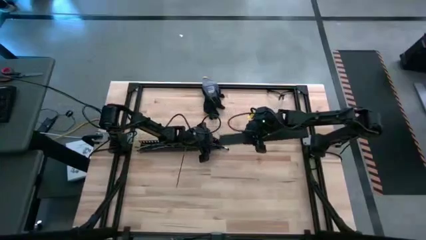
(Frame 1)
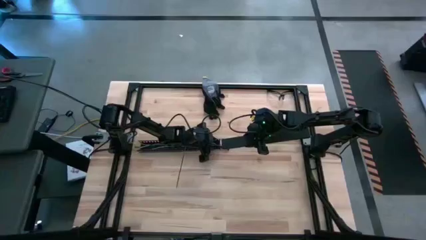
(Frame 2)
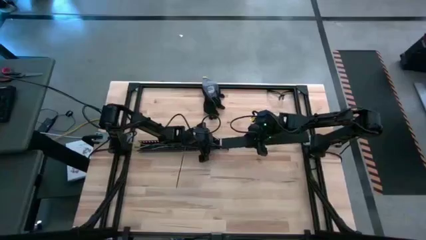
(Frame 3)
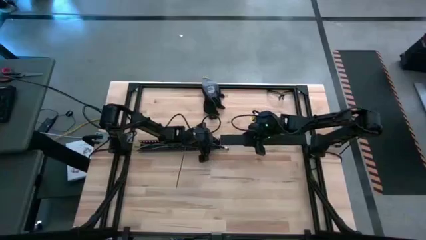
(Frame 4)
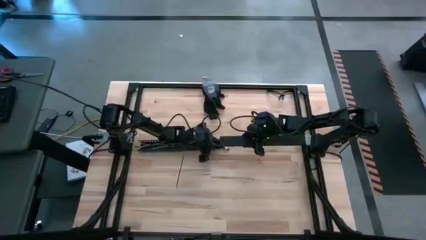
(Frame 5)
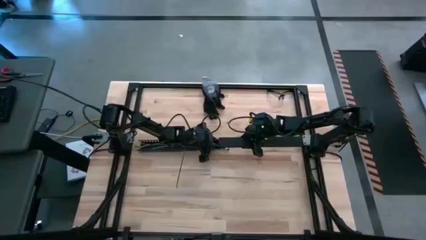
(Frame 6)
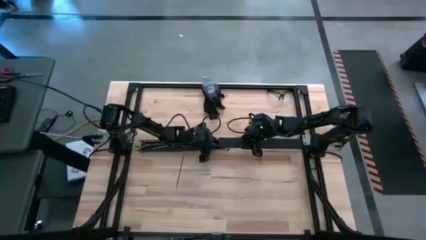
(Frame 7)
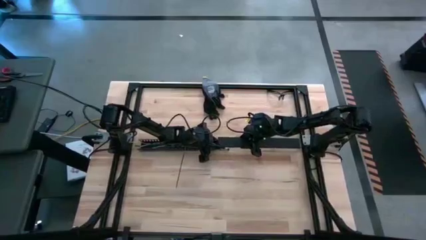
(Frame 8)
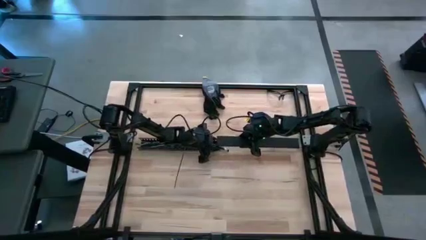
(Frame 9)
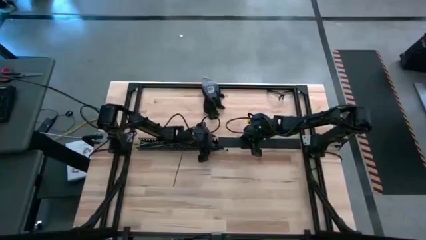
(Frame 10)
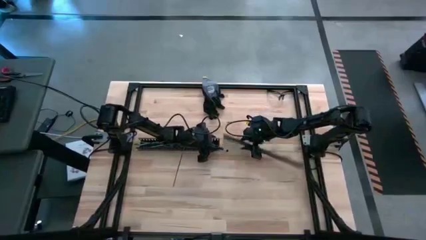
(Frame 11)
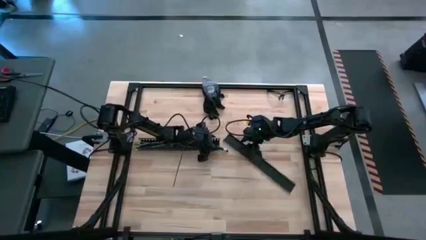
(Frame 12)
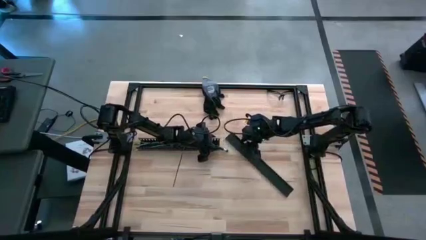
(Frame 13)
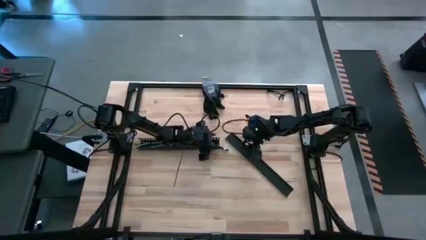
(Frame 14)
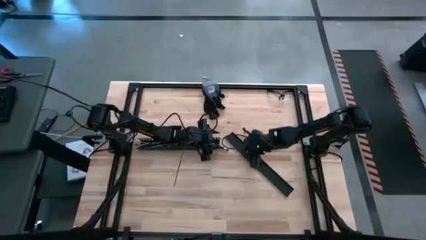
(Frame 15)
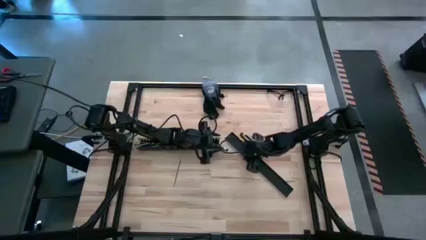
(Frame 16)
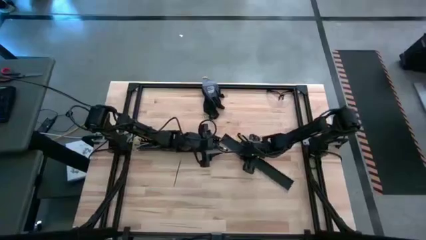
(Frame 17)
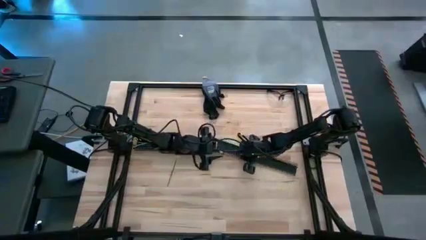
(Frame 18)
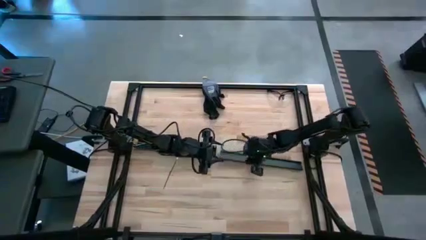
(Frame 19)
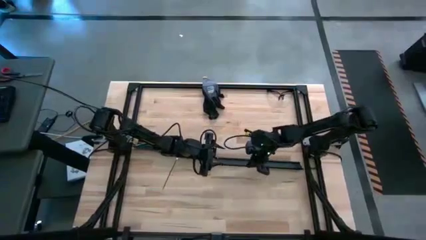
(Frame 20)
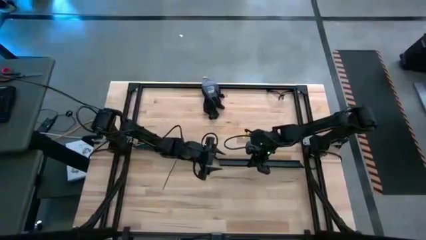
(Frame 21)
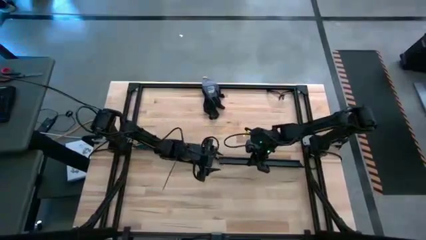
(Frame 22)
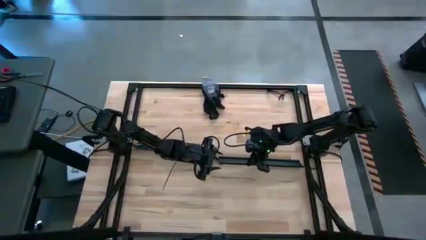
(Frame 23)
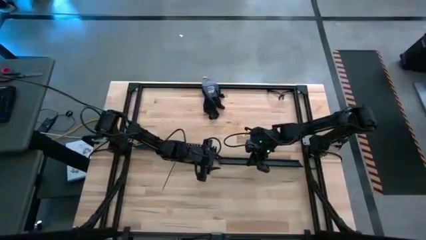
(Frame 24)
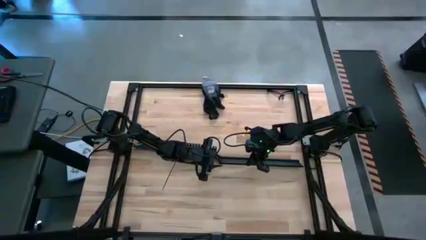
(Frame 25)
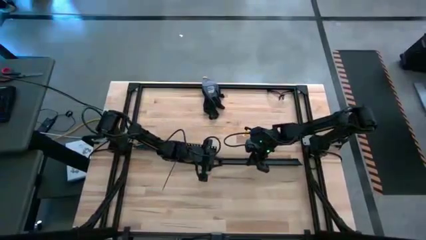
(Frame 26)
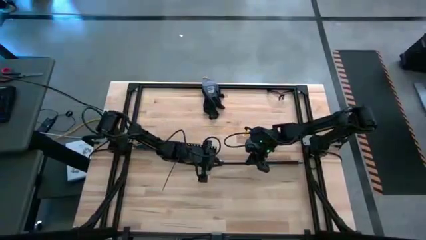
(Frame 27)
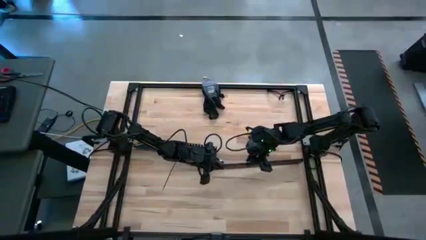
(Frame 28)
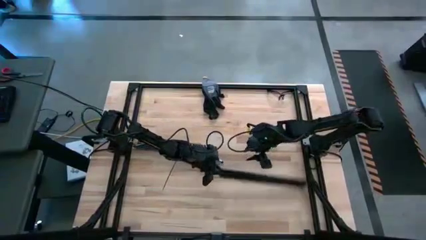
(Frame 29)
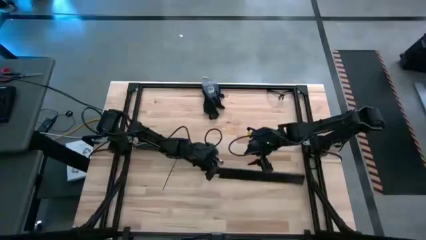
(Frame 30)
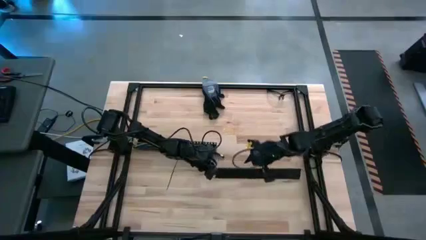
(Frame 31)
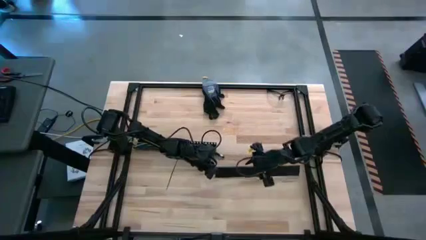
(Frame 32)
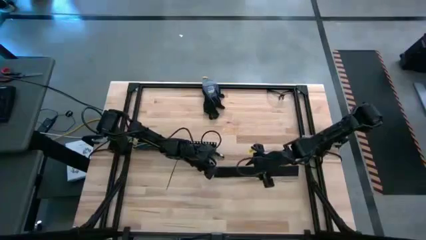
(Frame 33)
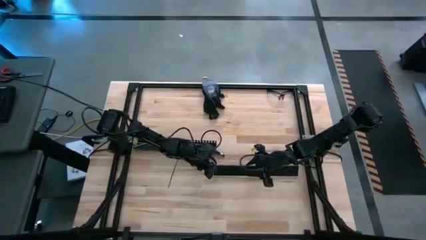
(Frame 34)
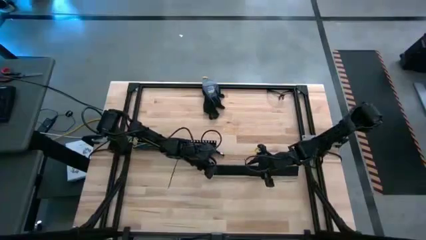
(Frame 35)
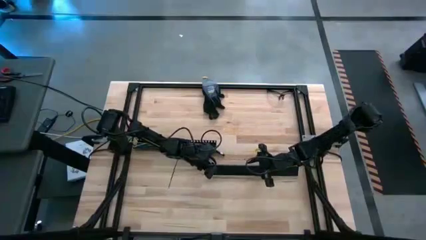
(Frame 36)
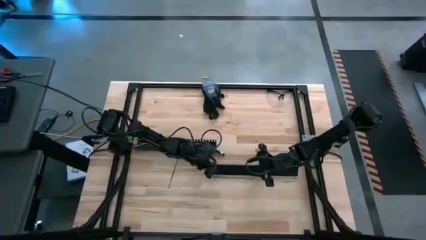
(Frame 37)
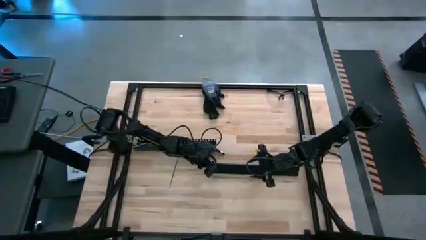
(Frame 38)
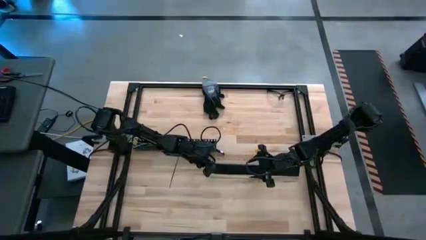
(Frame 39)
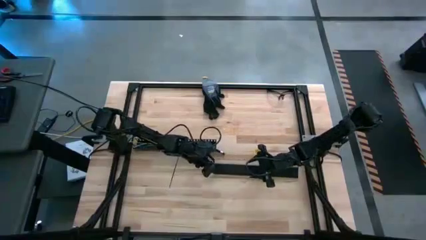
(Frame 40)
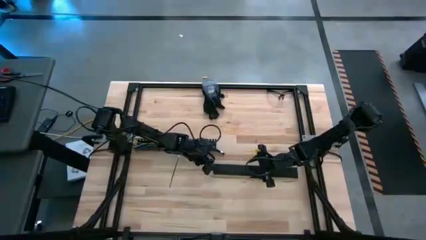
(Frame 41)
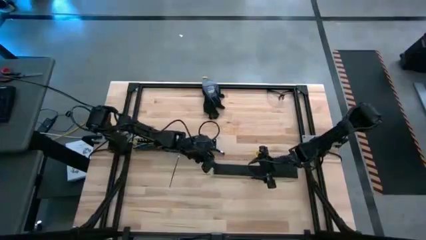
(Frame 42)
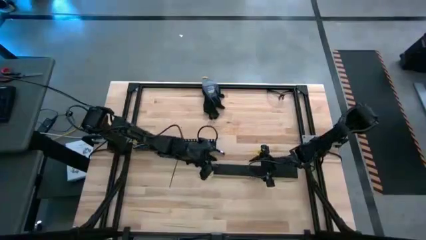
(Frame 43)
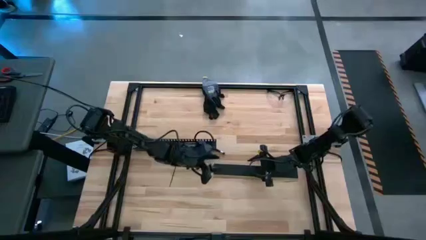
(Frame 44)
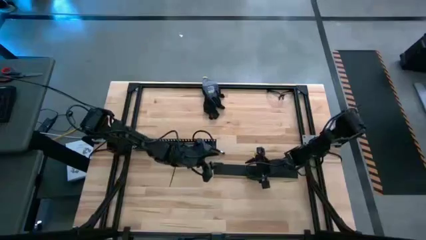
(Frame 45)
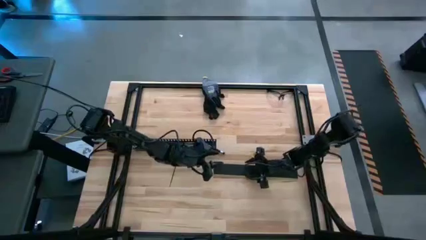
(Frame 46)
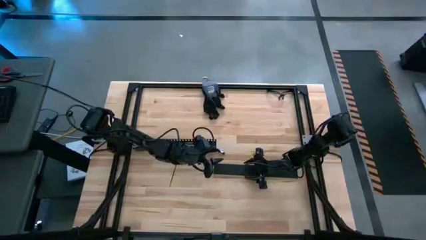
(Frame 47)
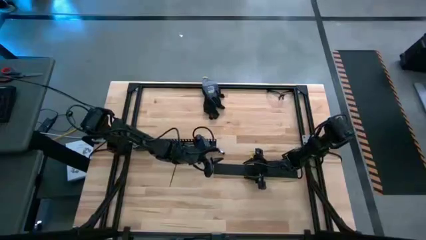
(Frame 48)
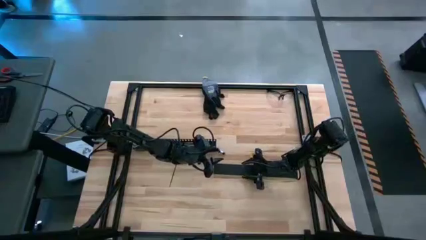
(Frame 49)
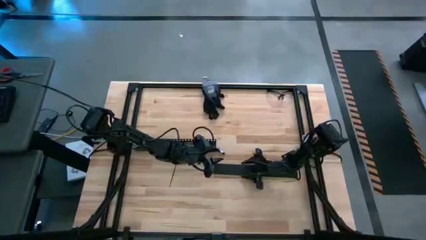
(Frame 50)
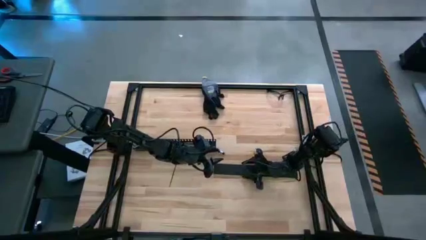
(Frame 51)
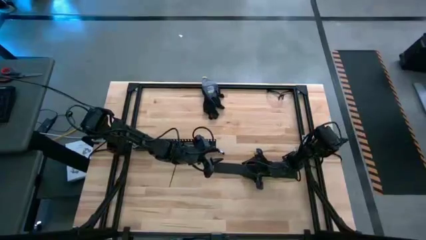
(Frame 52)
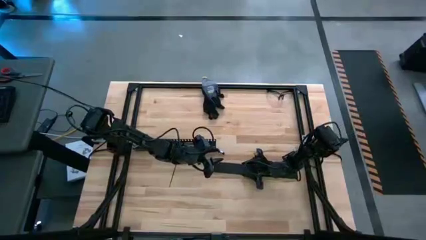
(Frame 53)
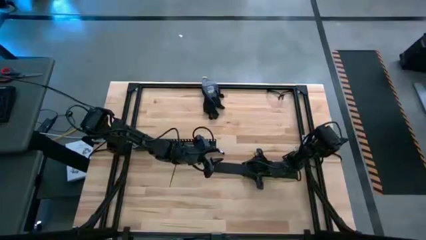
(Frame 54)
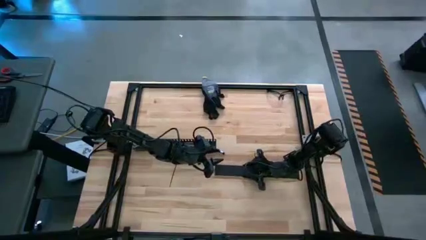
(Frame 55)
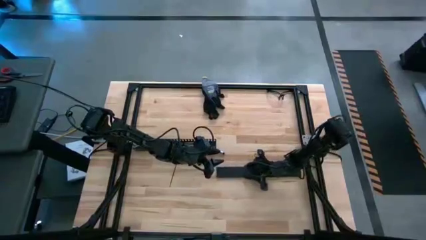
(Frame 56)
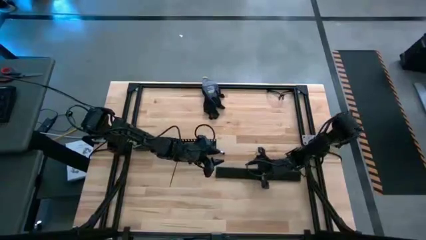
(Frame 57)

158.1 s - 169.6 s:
Task: Ziptie cables
Close the black cable duct

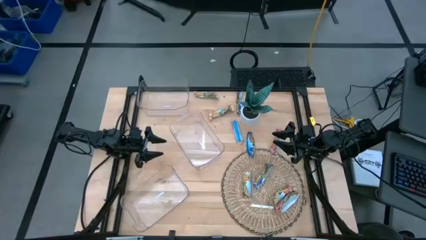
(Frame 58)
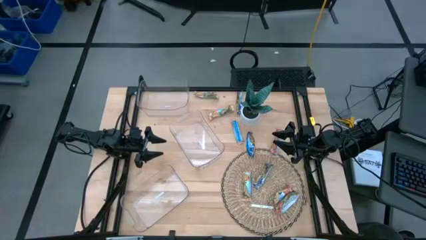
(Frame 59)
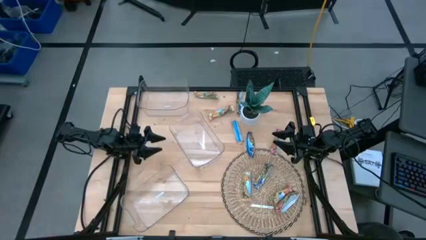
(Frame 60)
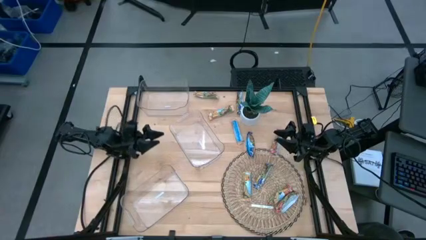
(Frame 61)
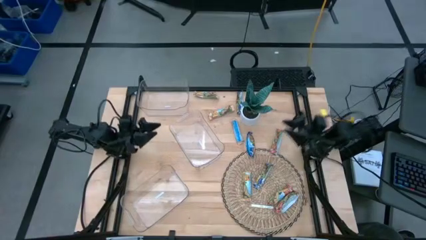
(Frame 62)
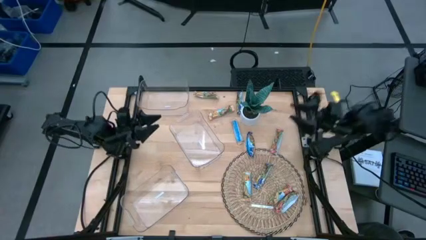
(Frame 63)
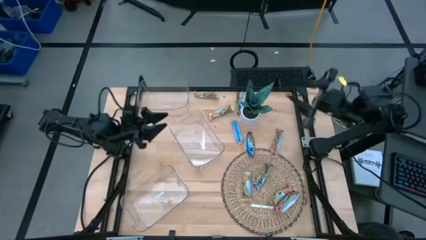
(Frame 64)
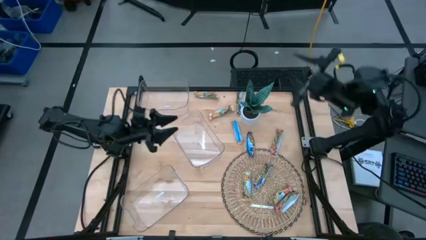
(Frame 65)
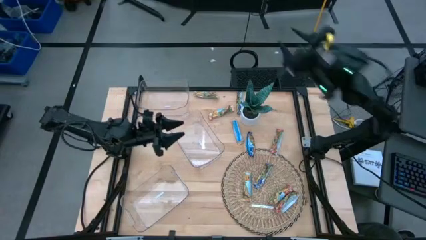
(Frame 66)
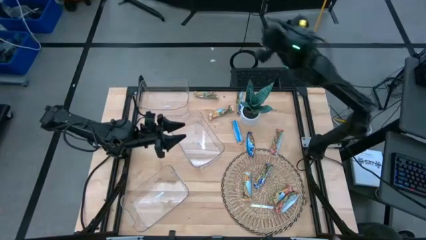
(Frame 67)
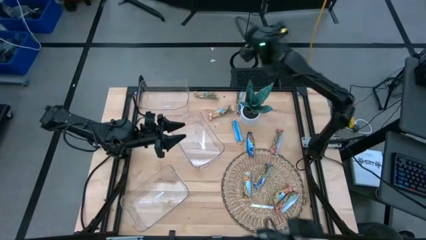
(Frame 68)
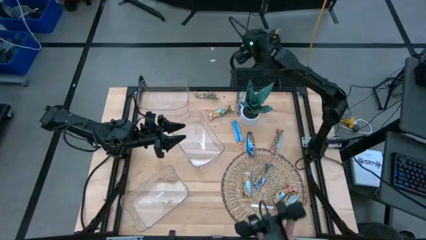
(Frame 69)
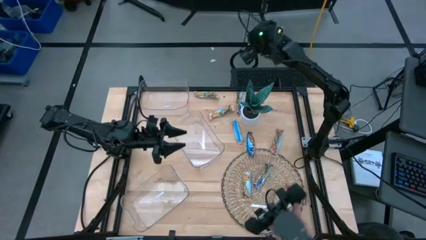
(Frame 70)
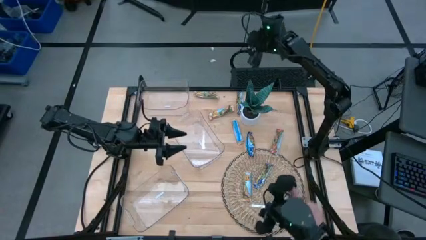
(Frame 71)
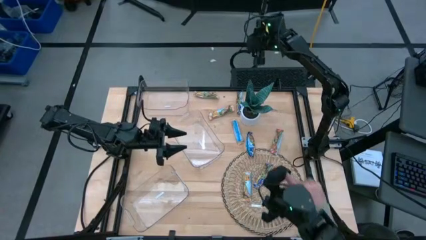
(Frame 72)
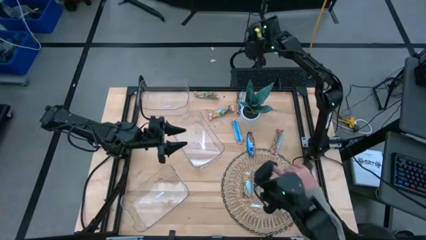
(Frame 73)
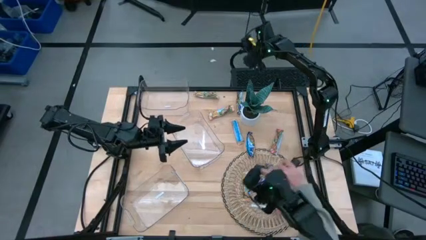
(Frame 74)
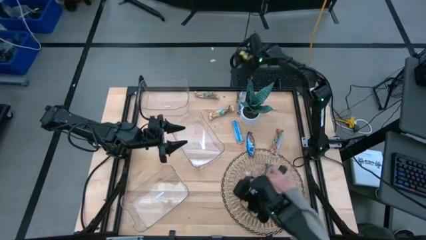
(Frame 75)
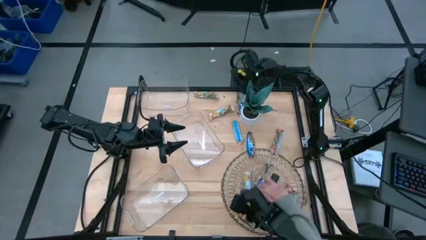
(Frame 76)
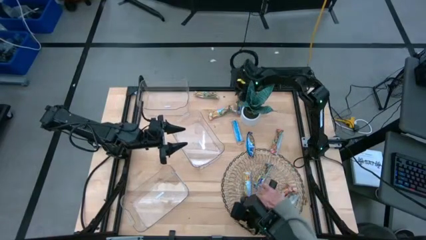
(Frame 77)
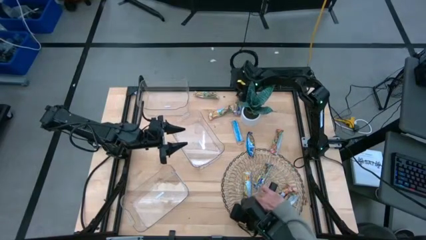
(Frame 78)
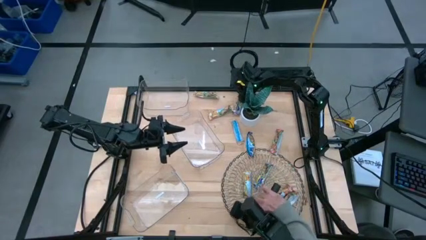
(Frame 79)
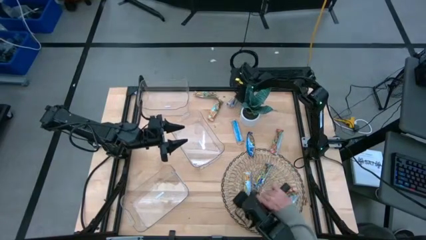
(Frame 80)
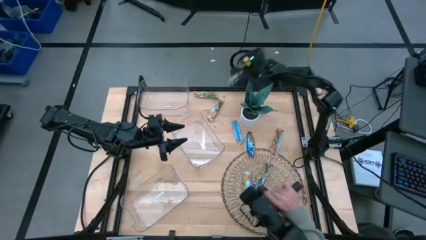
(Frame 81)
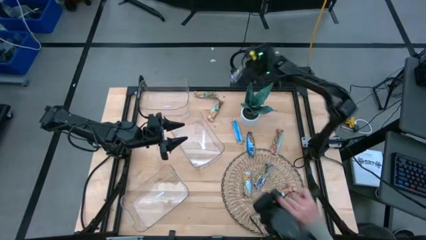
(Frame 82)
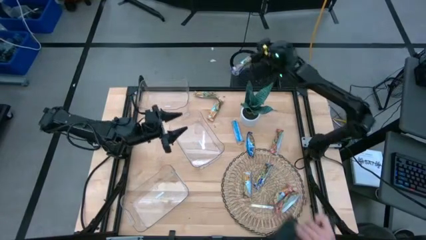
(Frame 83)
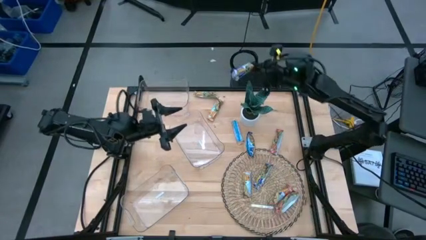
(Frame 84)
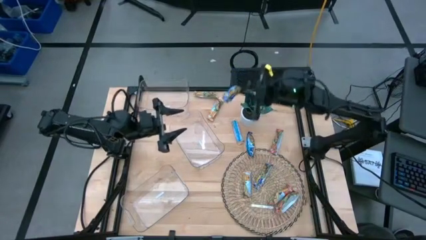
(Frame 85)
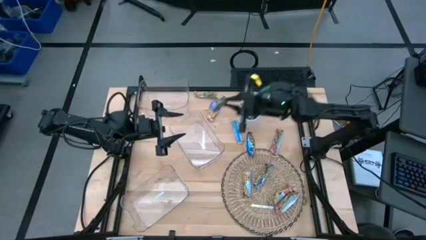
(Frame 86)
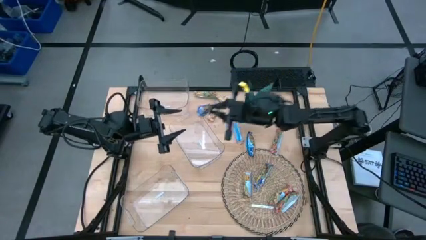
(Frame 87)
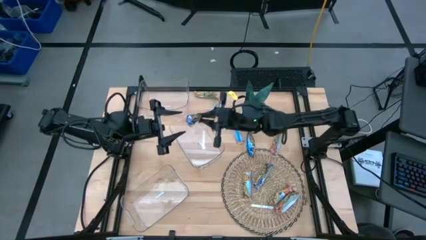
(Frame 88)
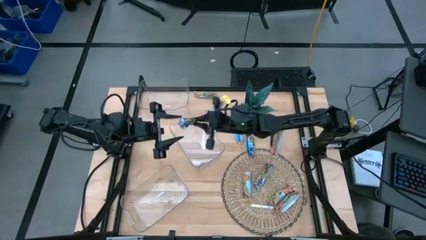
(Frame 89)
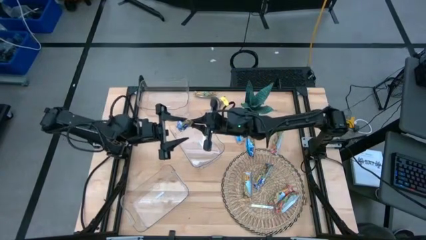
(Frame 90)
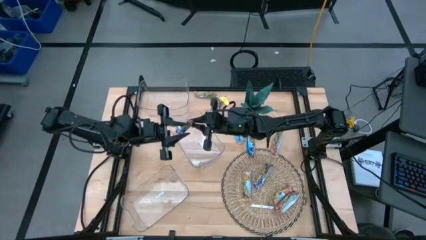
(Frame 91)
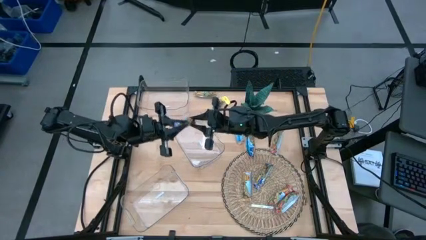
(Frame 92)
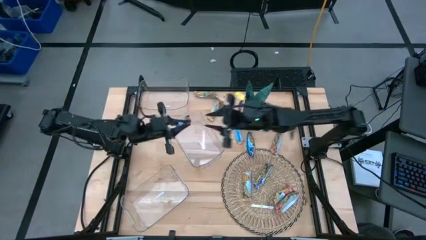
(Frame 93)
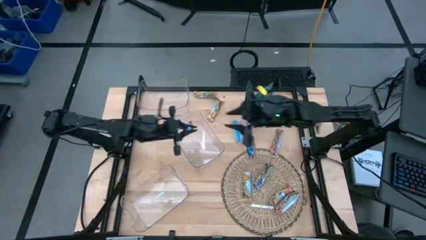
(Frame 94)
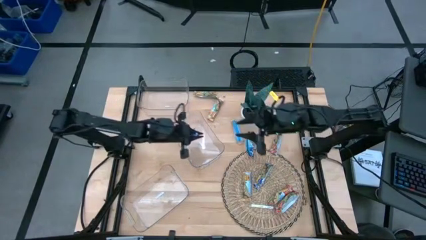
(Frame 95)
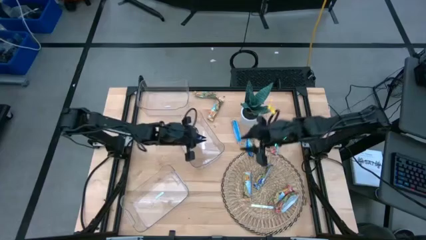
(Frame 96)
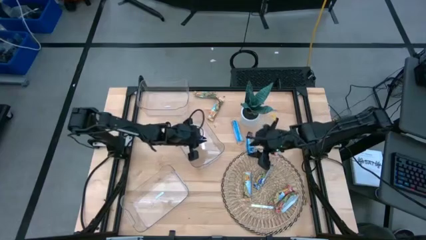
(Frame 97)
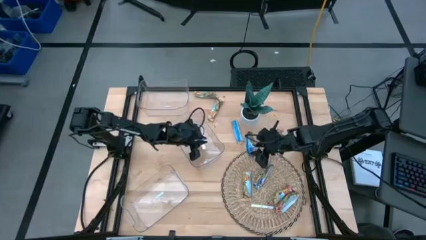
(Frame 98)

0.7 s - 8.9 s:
Task: Pick and place Granola Bars by type
Put the blue granola bar into the middle transparent bin
